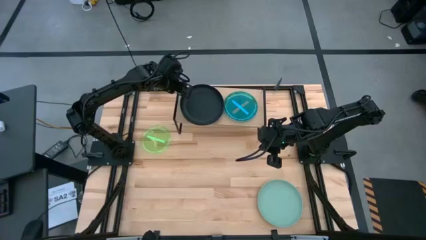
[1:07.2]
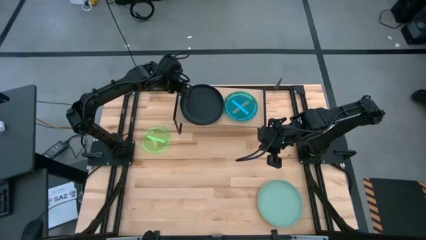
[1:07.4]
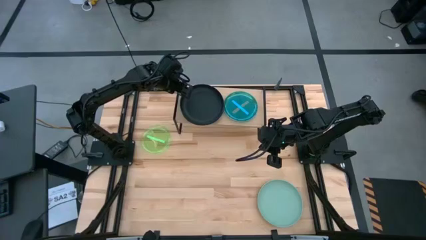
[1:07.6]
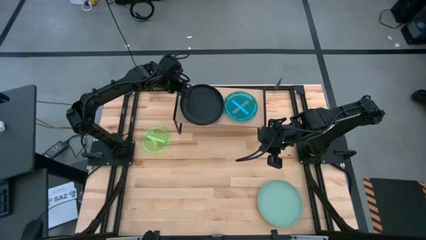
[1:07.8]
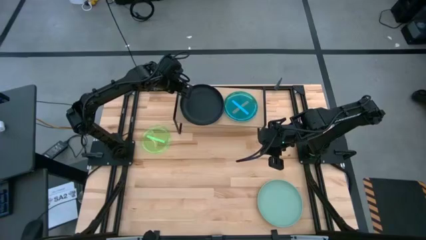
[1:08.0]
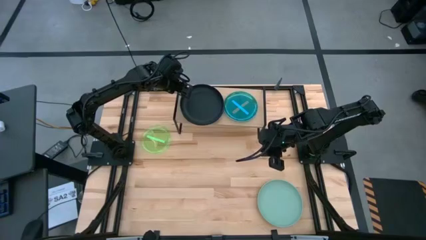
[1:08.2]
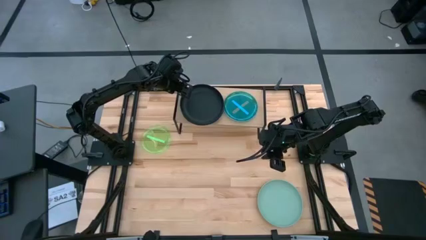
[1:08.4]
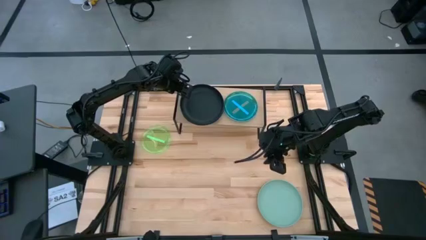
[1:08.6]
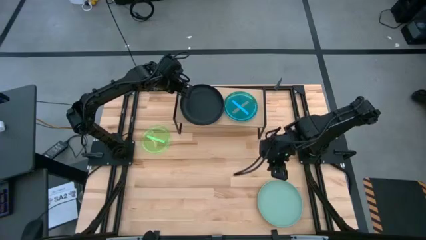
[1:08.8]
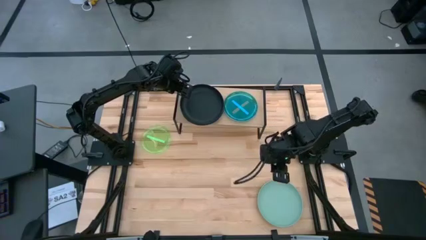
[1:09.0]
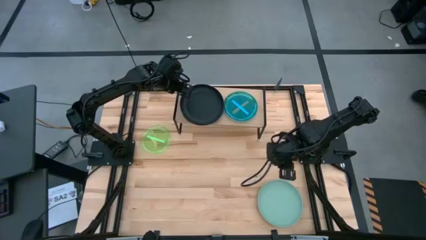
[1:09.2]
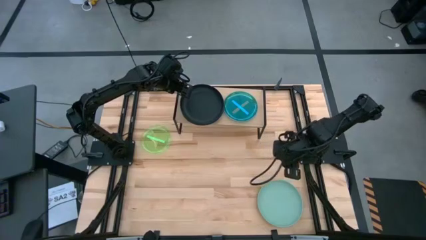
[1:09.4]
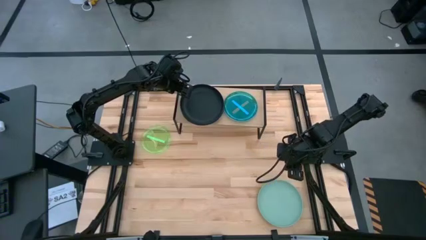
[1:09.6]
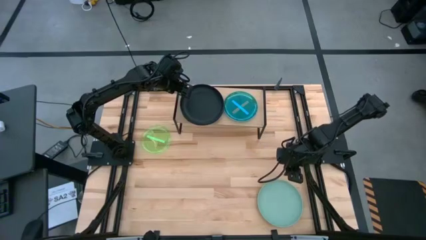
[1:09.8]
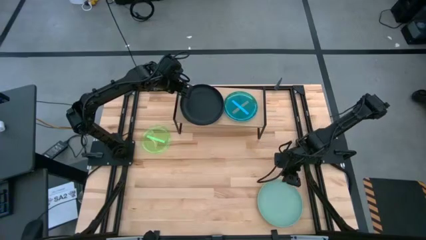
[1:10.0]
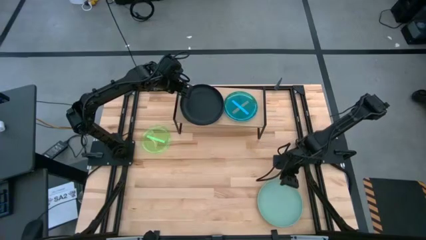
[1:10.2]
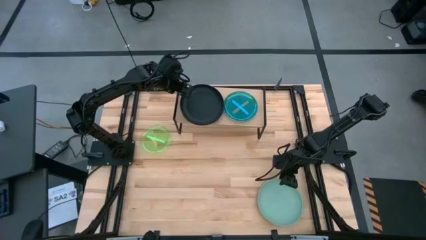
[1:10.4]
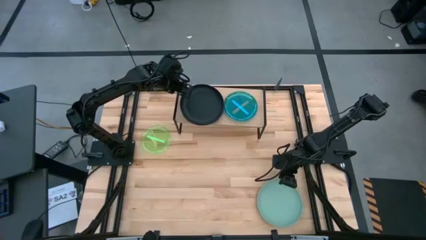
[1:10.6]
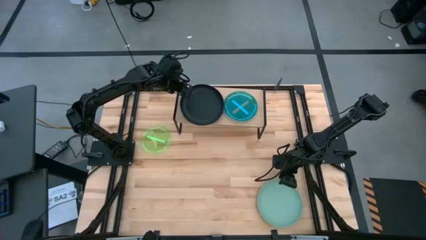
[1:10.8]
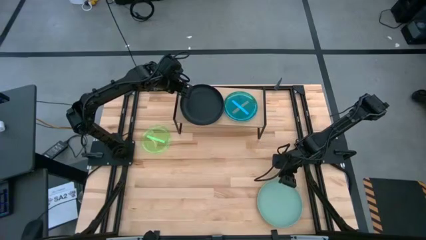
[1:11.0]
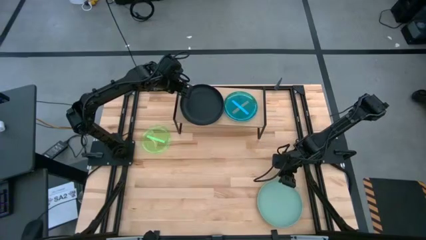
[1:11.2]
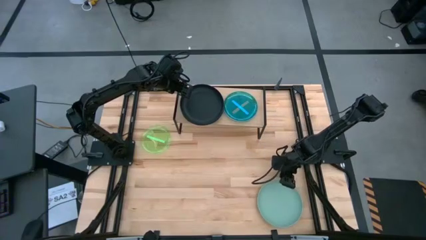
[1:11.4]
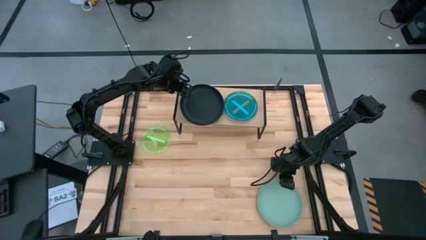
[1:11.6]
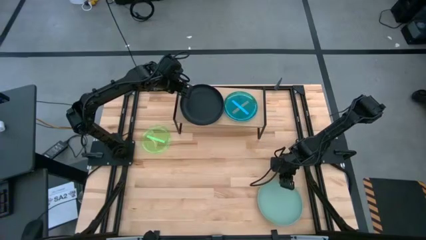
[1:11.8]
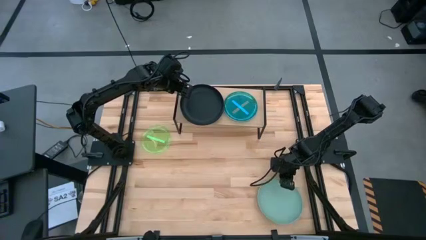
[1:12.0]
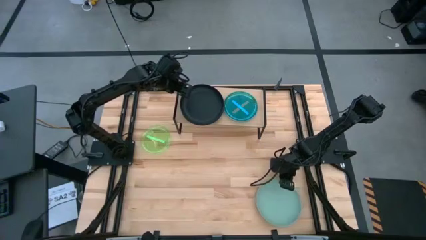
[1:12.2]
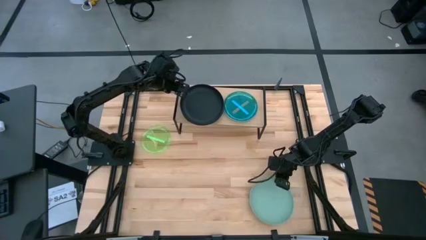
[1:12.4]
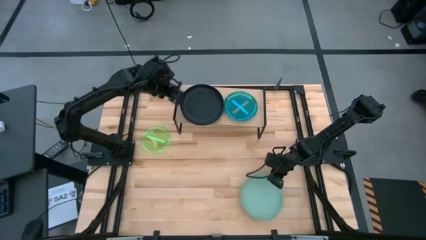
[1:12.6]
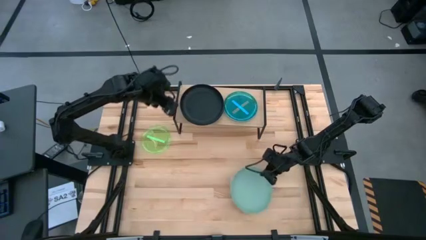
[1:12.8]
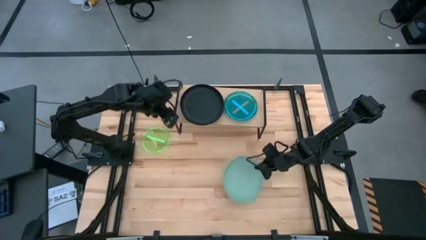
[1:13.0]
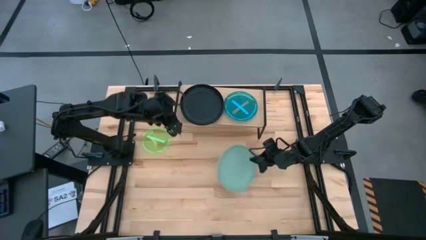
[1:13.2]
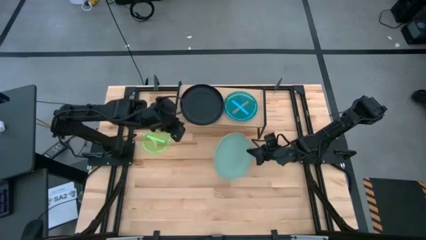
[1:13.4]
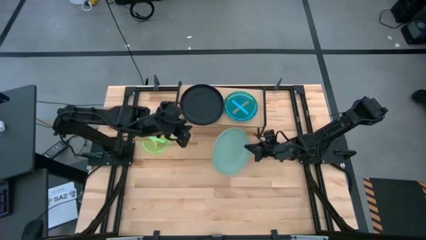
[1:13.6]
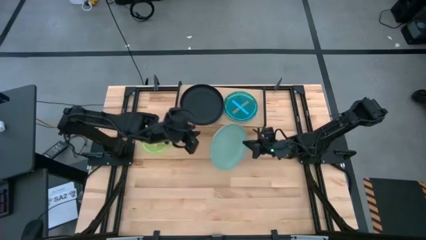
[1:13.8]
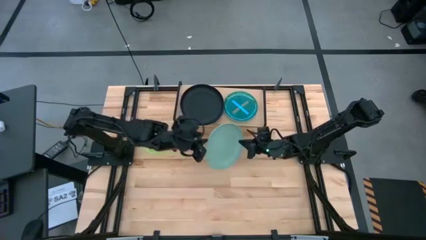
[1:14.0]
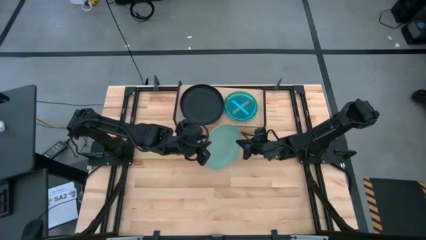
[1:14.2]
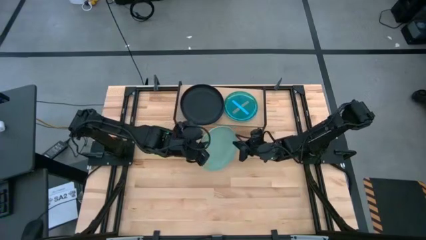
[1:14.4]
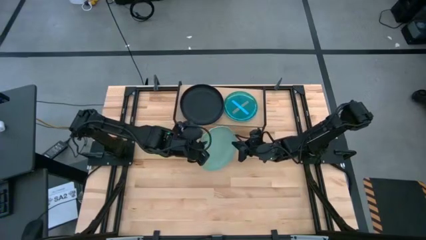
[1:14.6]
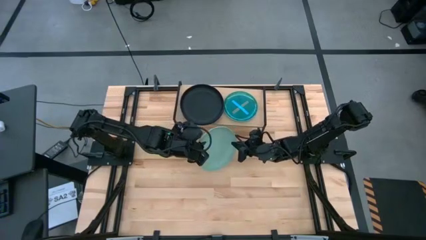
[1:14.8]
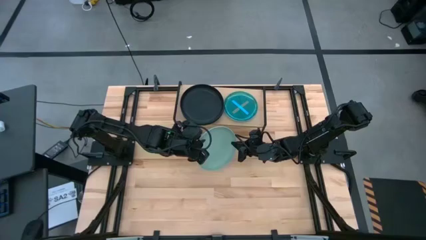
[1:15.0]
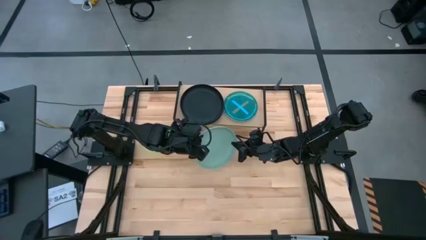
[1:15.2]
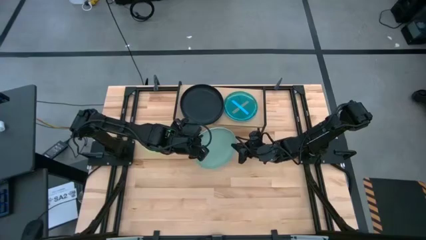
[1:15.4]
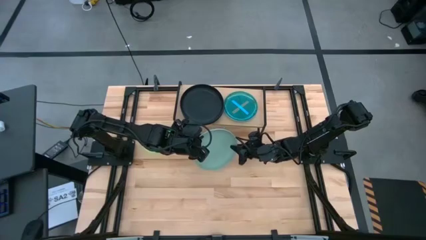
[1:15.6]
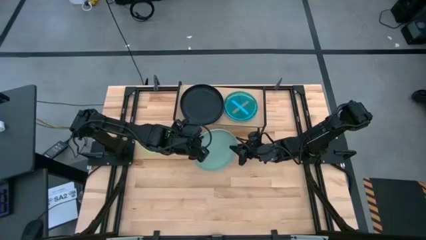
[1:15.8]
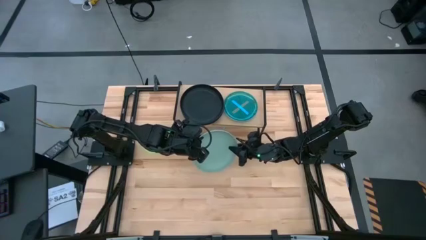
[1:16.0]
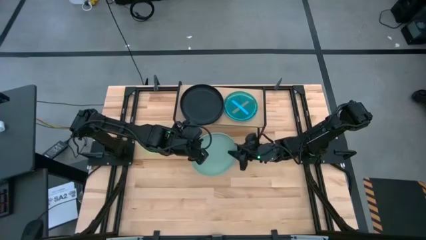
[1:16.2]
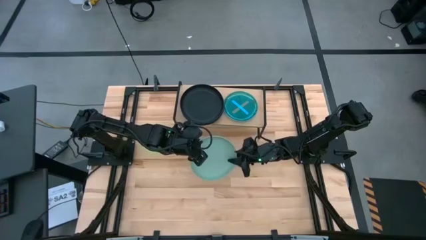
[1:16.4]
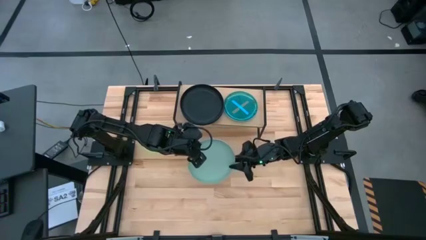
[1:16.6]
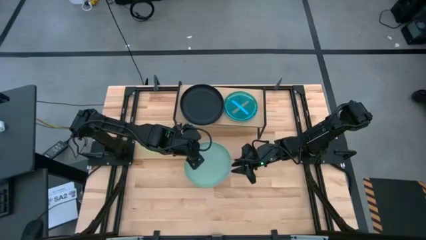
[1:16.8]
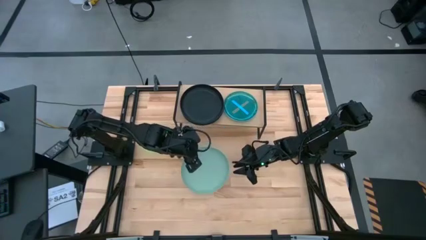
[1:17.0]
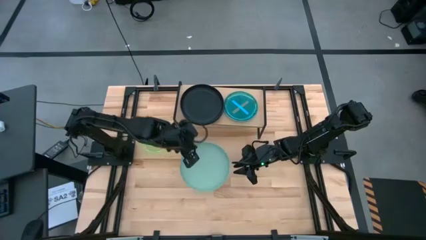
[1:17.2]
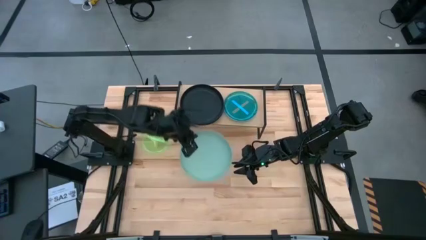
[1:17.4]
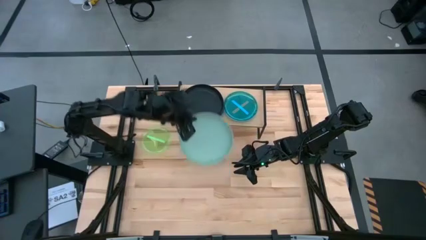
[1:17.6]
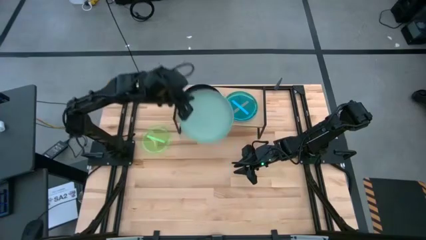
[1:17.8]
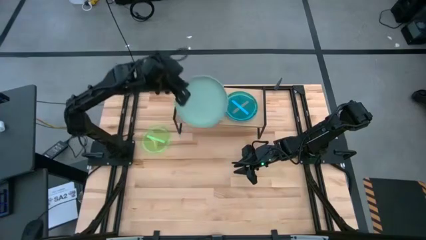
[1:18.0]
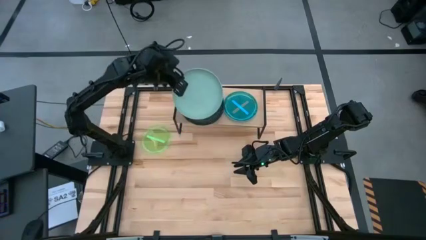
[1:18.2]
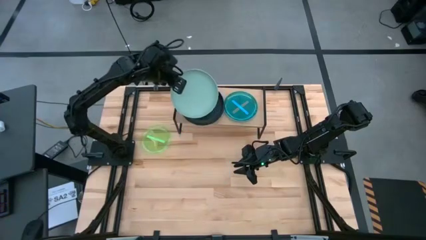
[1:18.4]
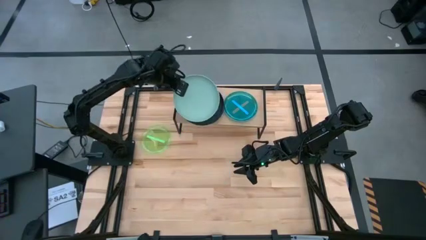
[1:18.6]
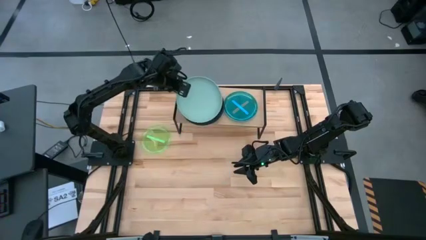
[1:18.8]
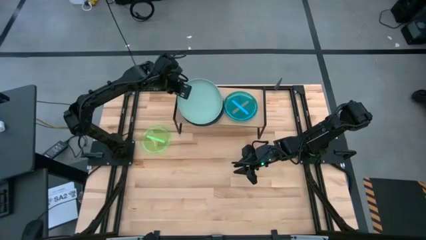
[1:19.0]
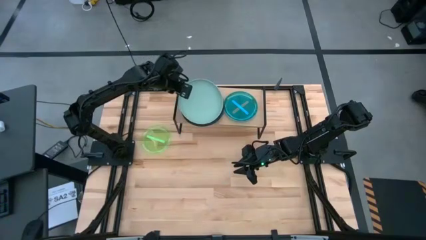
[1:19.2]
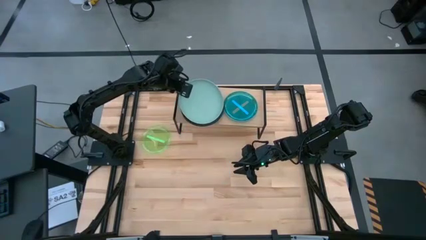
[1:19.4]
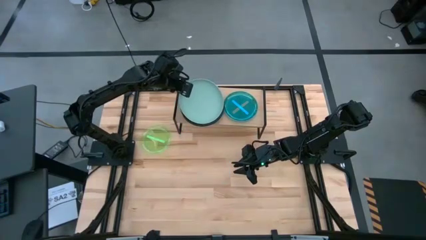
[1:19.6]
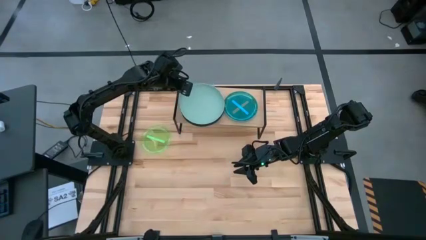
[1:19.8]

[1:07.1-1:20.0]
Task: Place and stack plates onto a shelf
Stack the light blue plate on top of the black plate on the shelf
